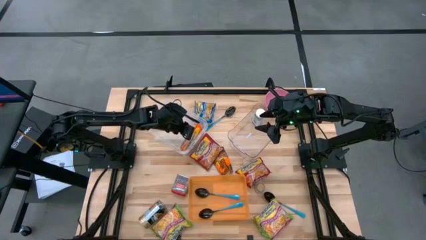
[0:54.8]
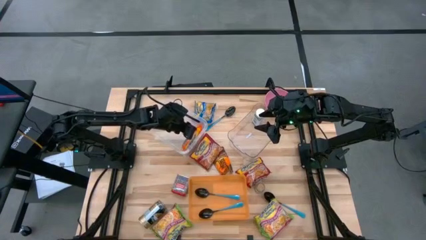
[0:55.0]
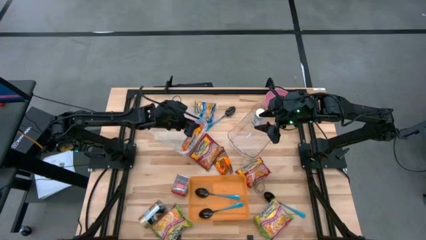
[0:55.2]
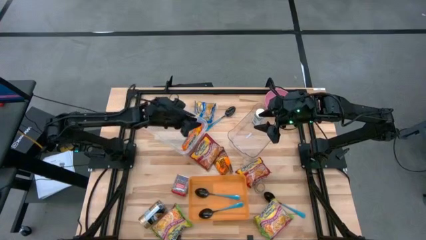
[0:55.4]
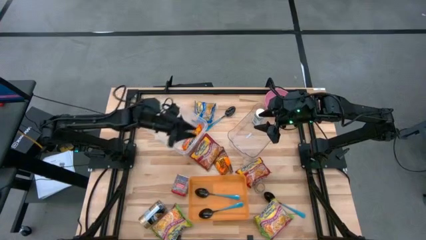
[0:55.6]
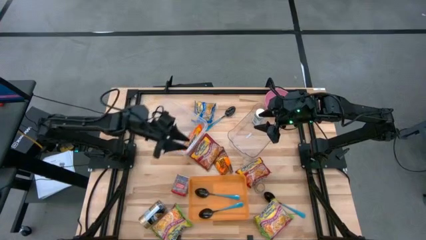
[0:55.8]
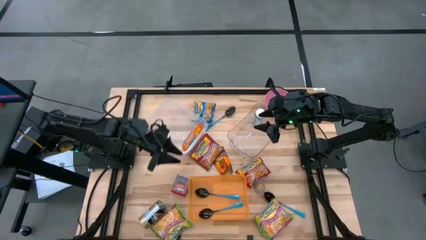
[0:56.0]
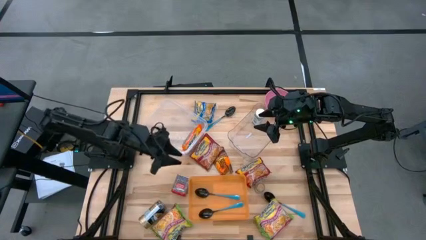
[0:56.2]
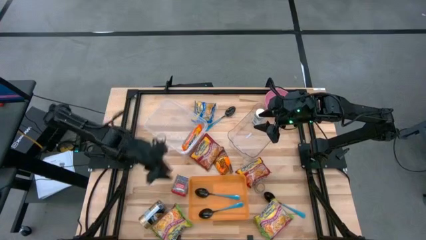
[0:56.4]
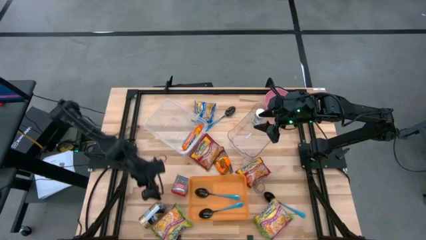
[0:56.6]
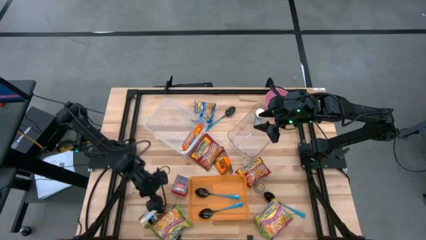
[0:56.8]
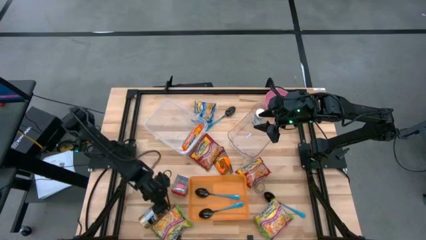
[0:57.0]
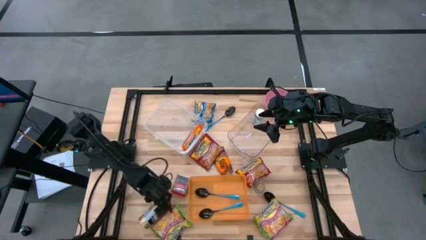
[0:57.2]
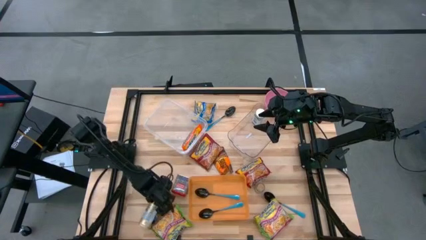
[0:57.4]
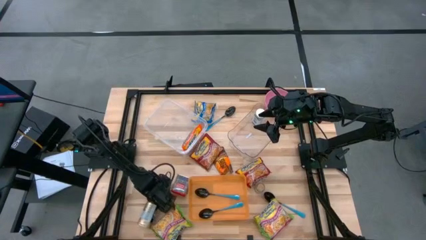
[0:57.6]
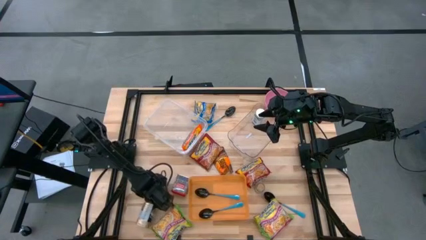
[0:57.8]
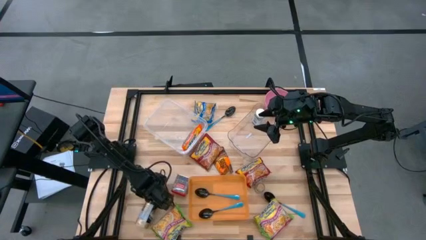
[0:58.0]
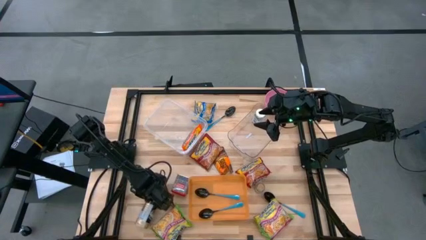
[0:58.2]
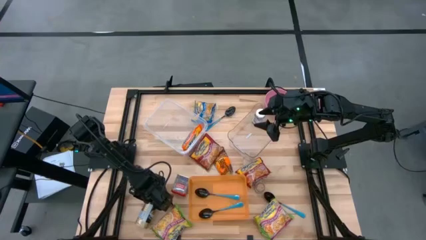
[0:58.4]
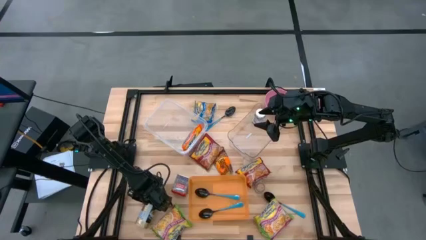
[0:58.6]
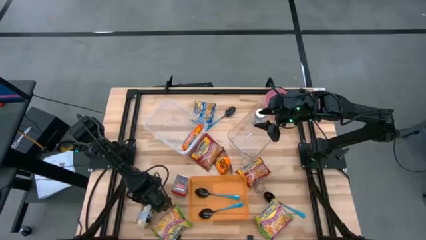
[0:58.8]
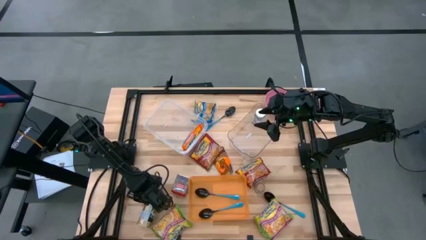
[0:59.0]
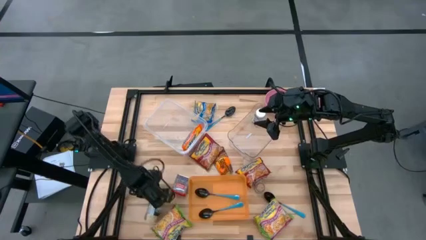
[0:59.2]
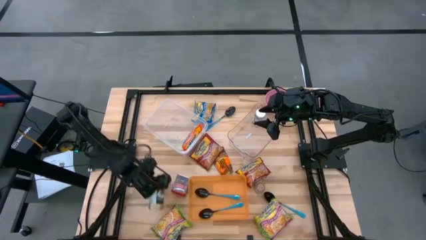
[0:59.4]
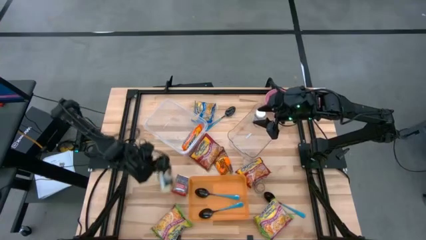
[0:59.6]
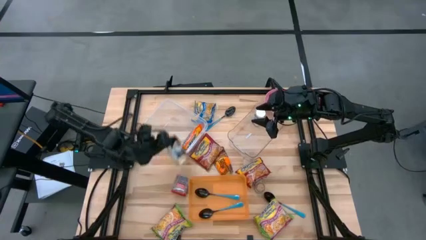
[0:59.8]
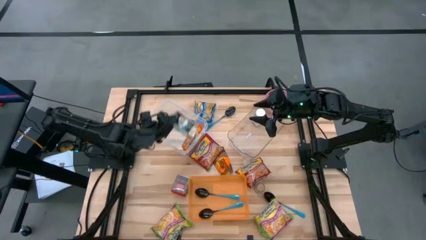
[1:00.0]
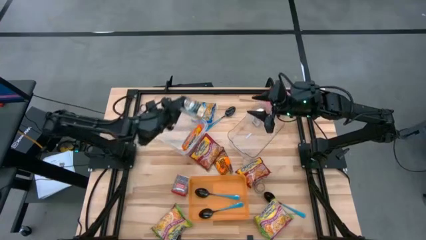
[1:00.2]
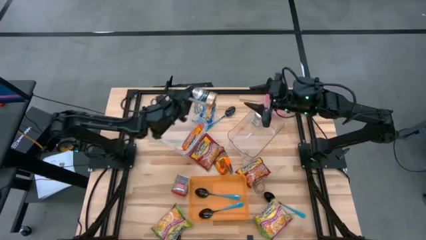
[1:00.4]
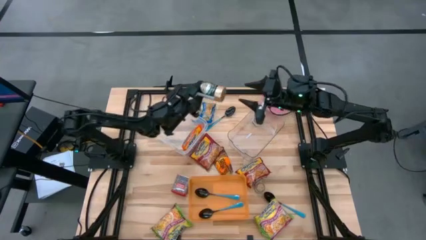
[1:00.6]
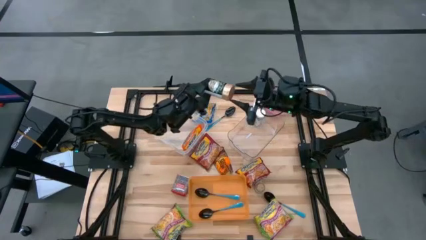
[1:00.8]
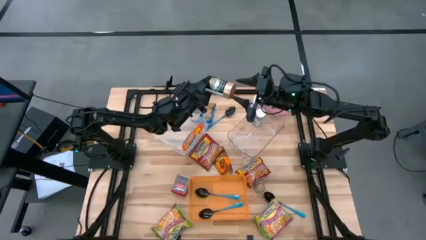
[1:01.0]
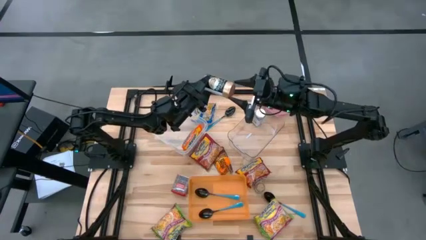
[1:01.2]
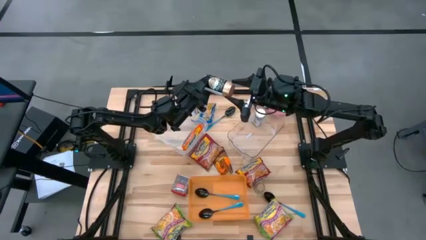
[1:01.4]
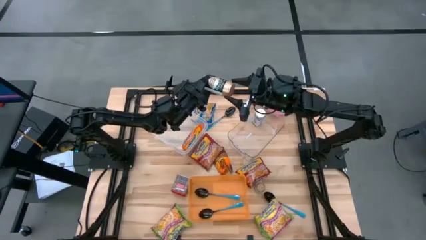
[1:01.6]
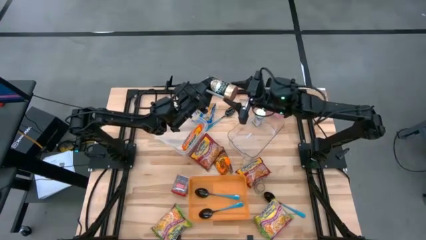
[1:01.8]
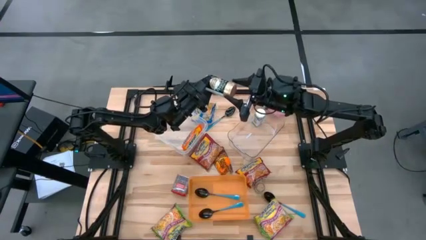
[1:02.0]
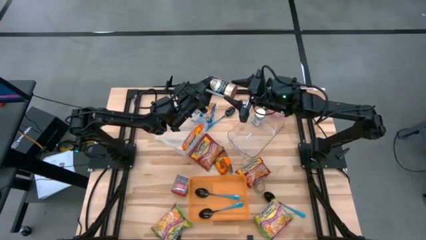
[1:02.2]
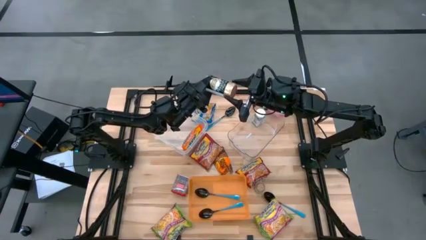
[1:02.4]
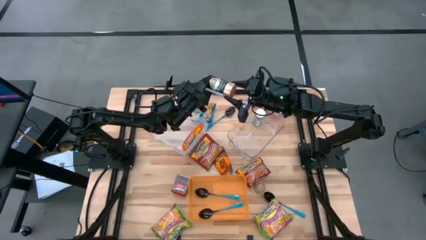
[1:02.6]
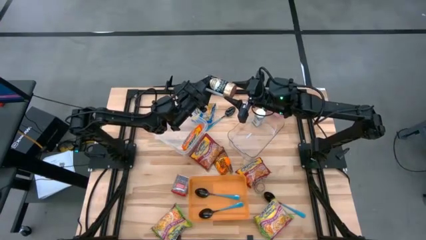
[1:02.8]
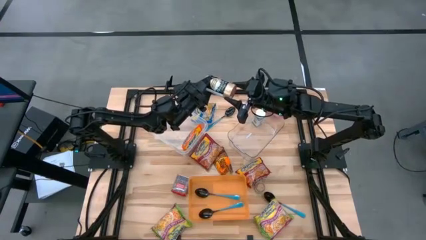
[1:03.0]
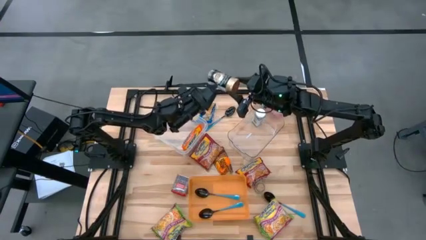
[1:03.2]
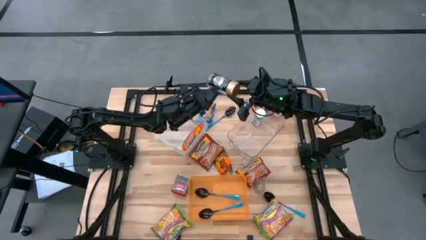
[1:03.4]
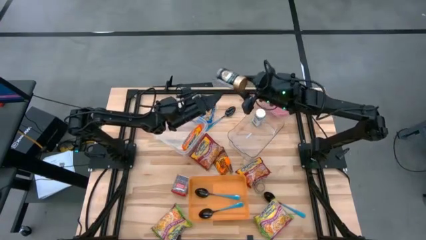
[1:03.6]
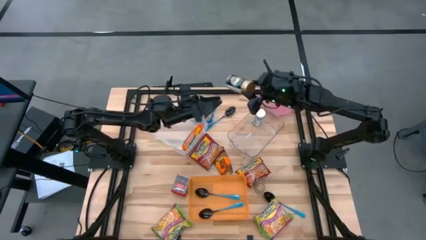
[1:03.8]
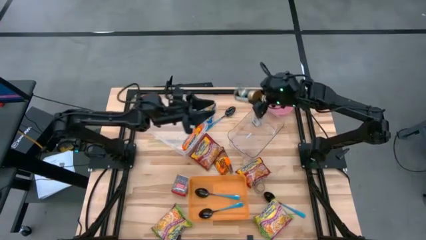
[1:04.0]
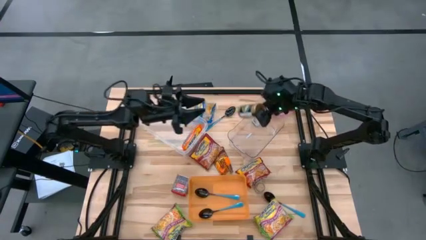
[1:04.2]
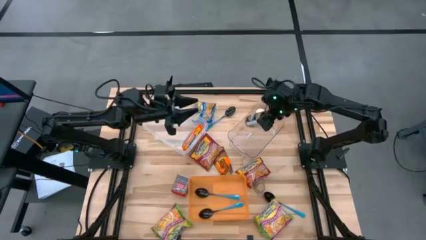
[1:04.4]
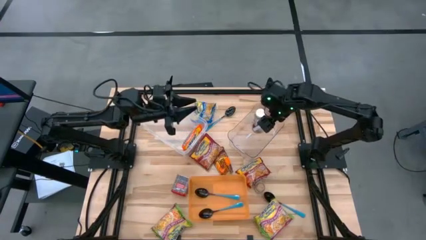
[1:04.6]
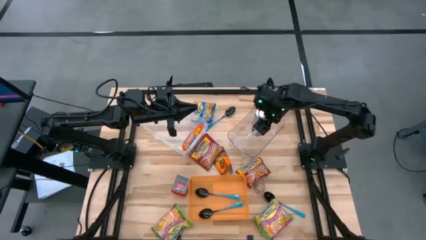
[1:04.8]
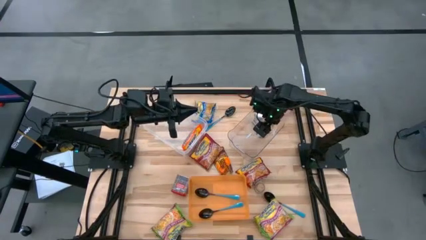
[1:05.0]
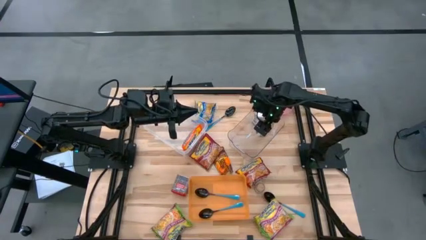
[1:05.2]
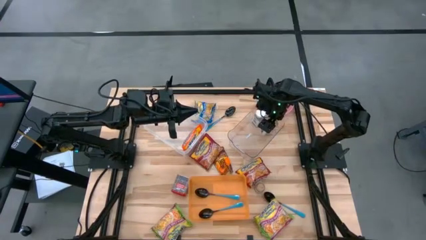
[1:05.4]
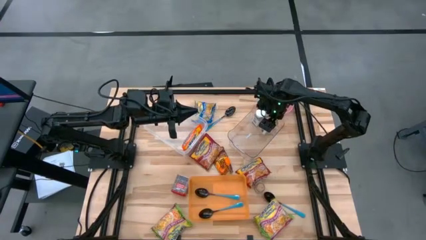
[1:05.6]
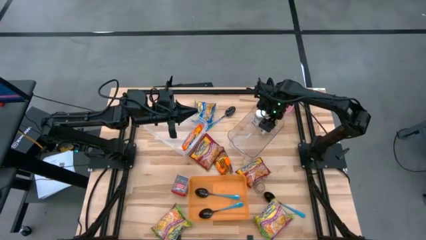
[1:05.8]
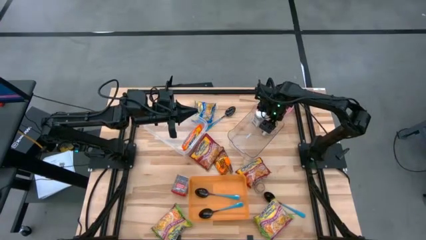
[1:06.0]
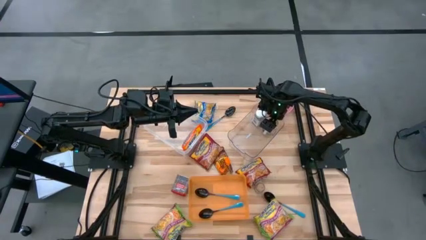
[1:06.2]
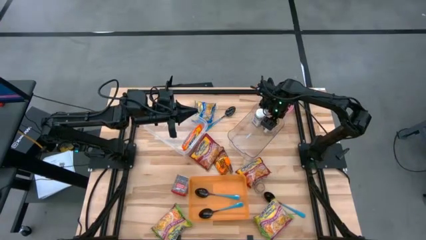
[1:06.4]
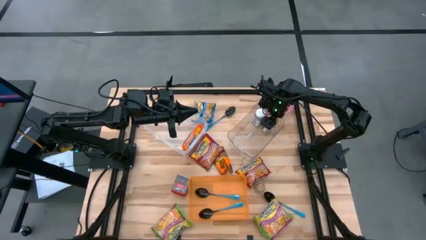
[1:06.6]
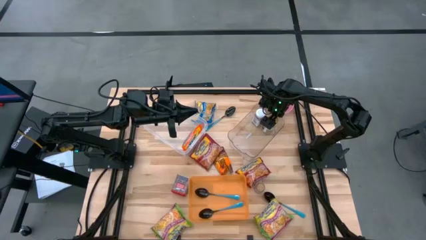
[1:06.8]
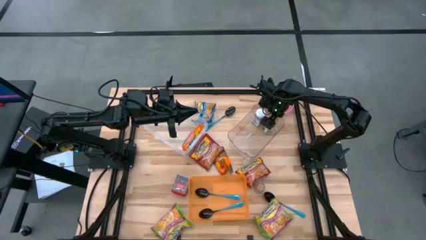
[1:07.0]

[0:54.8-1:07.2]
Task: Pick & Place Food Item
Put the gold seasoning bottle into the transparent bin

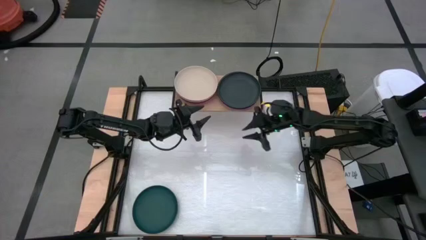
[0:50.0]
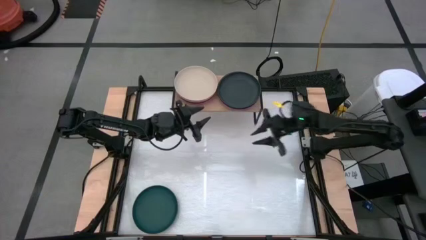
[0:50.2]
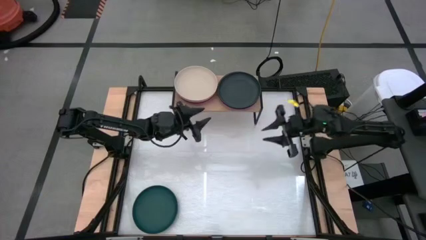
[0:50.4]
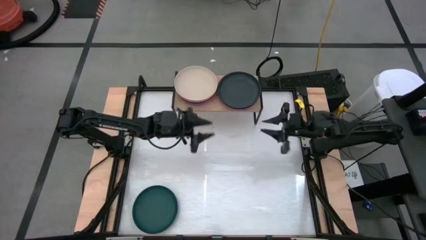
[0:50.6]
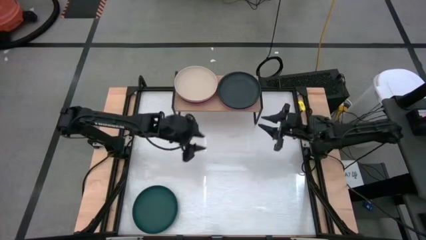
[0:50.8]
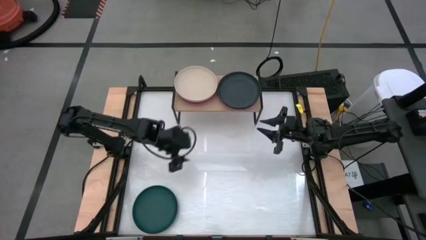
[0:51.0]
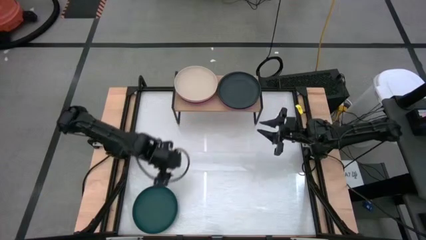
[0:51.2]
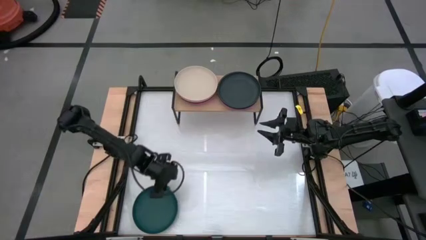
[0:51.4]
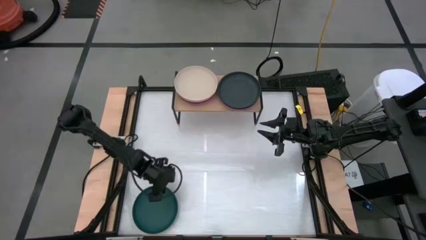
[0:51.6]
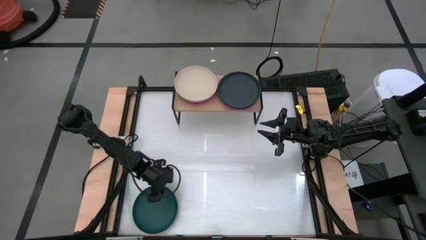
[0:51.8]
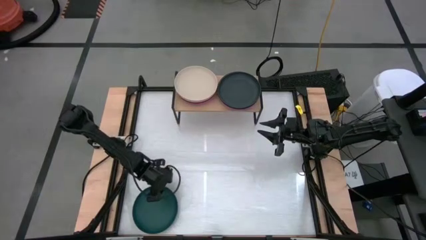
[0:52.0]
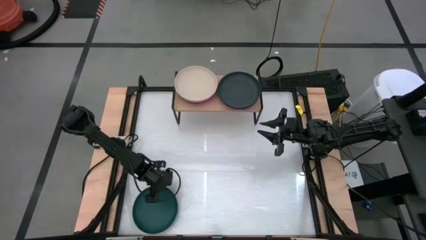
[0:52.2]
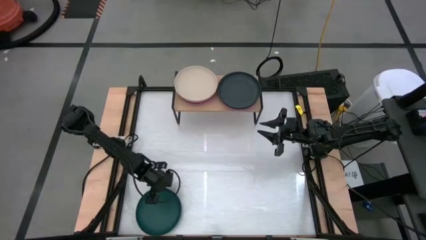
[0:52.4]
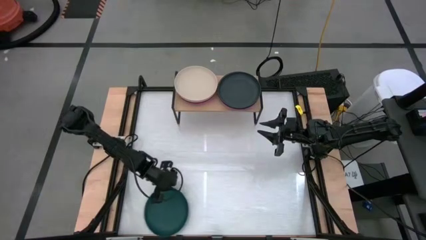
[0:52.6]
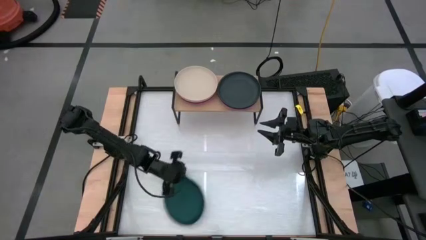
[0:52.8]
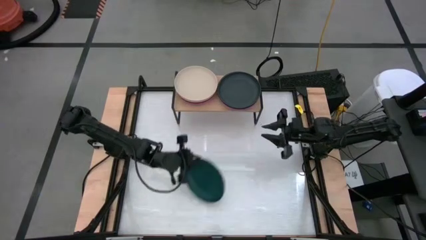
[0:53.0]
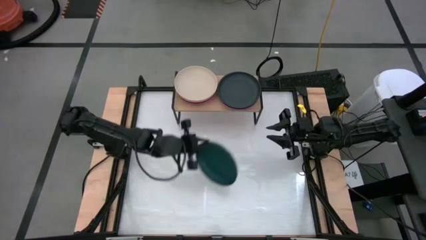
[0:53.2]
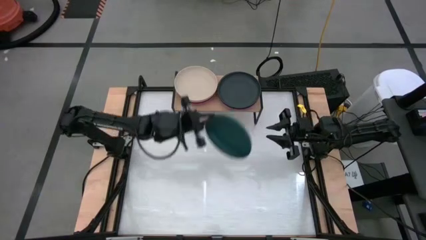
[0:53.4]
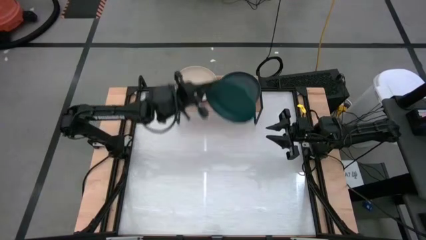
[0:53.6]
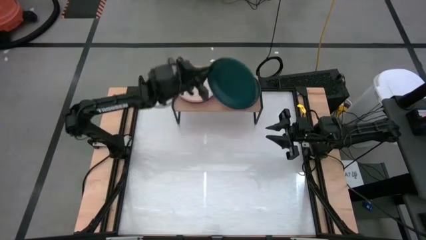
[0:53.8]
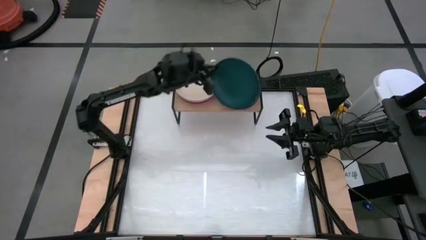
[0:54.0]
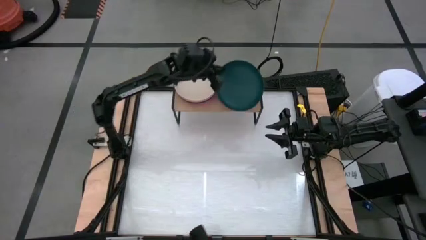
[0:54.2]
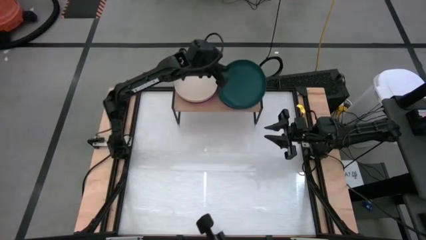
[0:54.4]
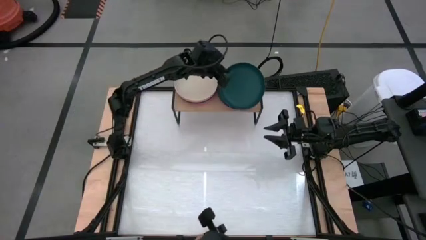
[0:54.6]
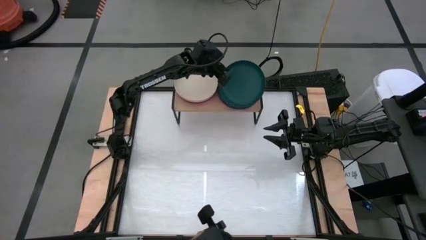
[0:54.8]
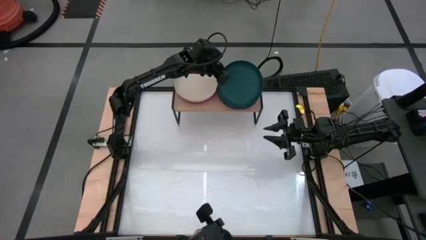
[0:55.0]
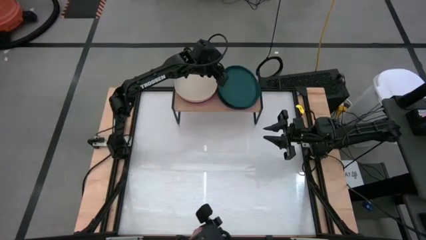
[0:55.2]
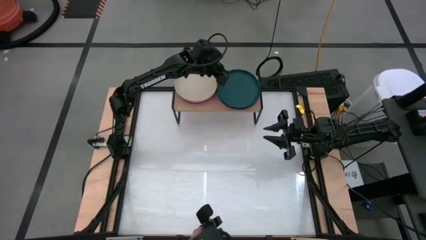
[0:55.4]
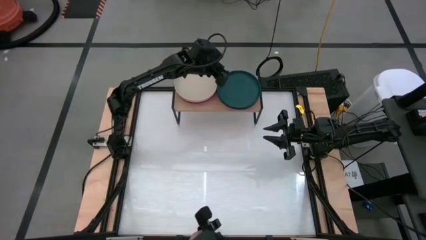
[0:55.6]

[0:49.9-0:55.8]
Task: Place and stack plates onto a shelf
Stack the green plate on top of the black plate on the shelf
